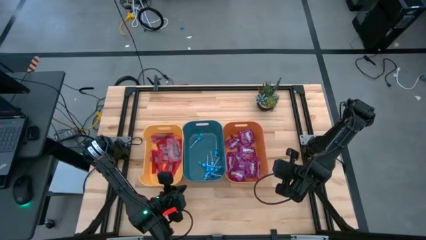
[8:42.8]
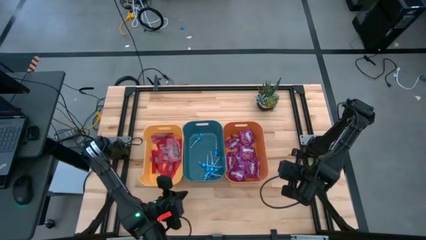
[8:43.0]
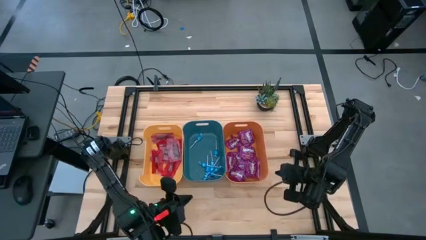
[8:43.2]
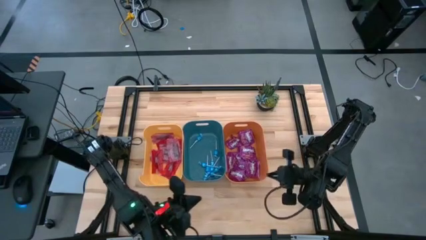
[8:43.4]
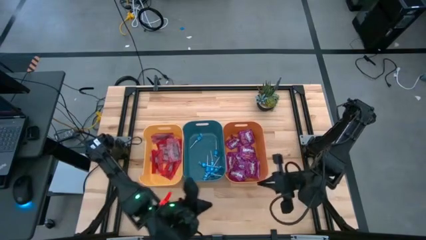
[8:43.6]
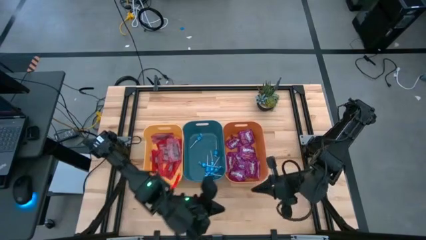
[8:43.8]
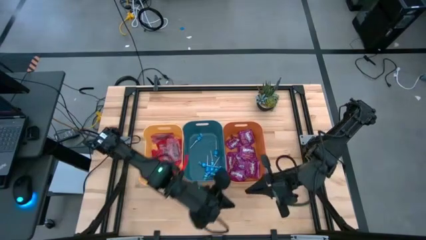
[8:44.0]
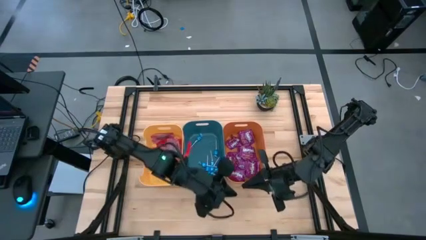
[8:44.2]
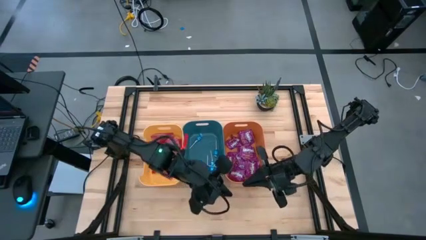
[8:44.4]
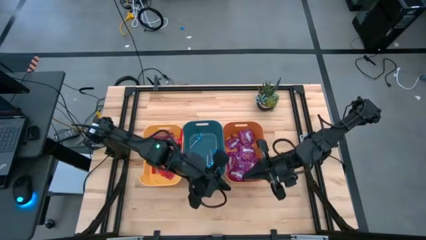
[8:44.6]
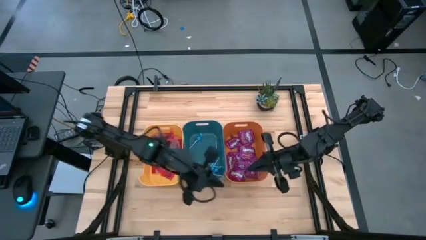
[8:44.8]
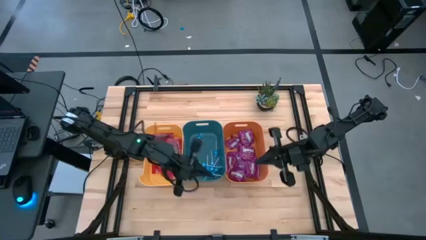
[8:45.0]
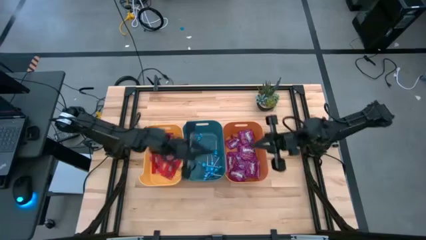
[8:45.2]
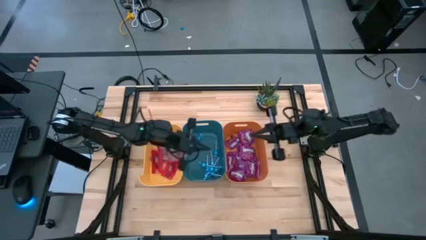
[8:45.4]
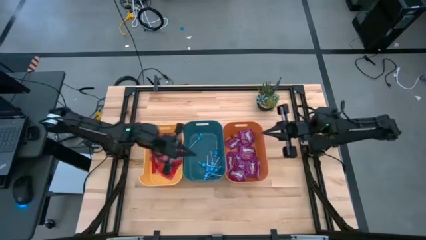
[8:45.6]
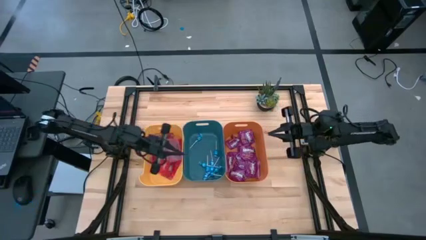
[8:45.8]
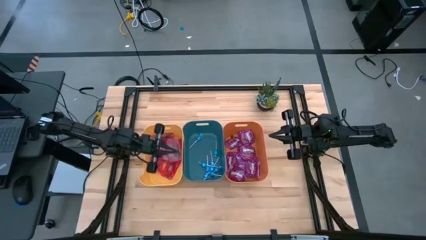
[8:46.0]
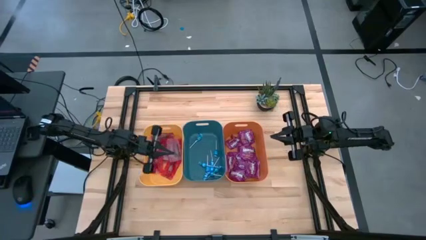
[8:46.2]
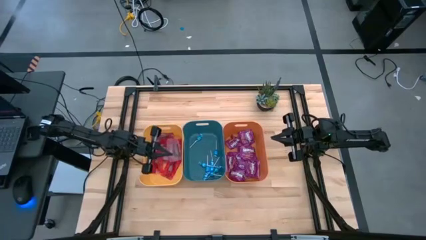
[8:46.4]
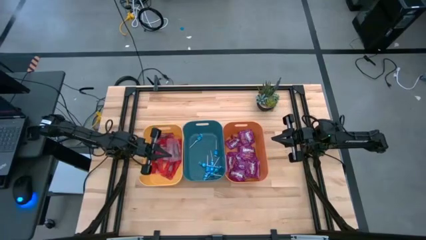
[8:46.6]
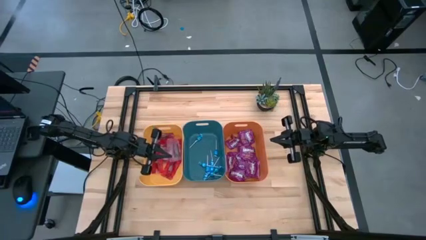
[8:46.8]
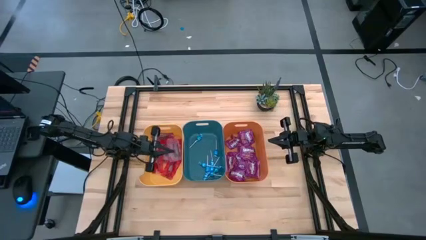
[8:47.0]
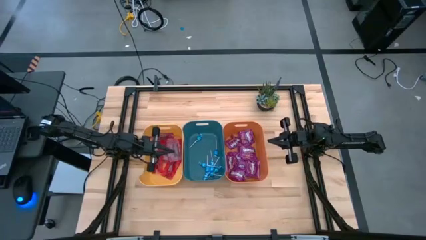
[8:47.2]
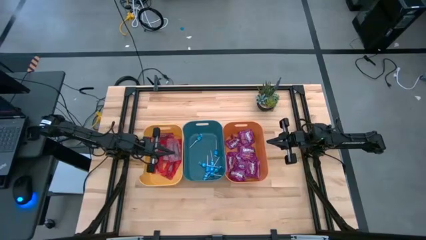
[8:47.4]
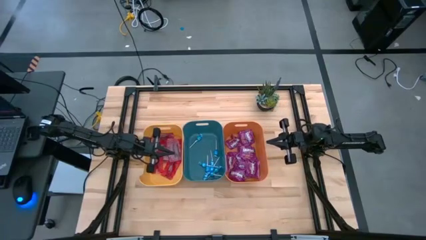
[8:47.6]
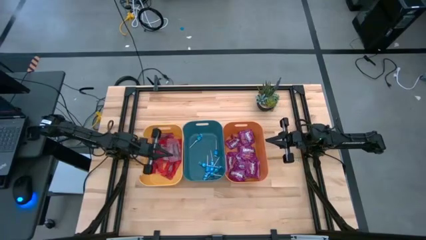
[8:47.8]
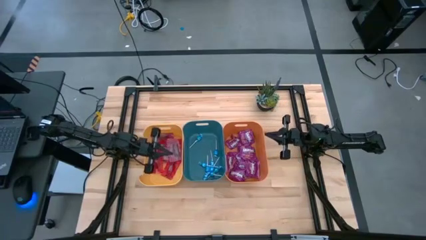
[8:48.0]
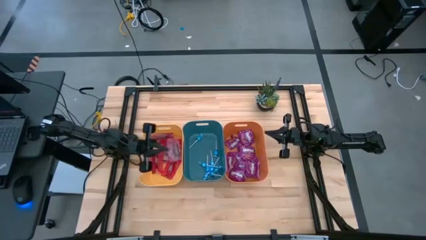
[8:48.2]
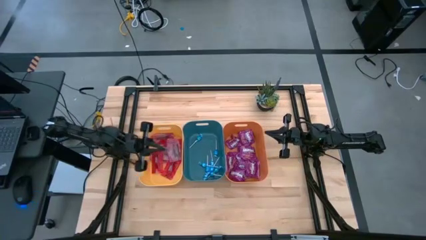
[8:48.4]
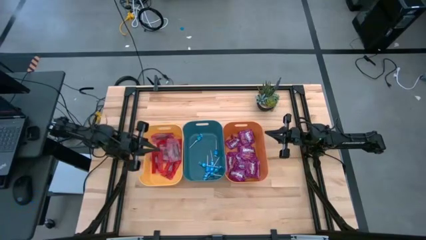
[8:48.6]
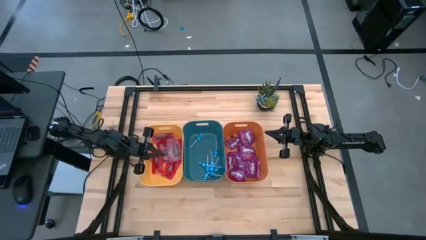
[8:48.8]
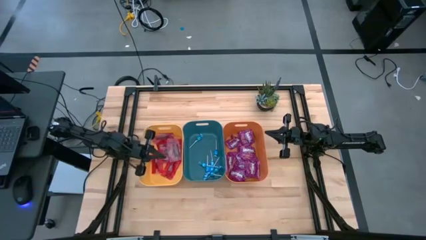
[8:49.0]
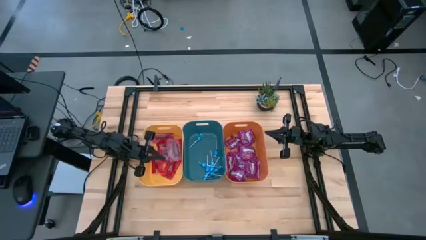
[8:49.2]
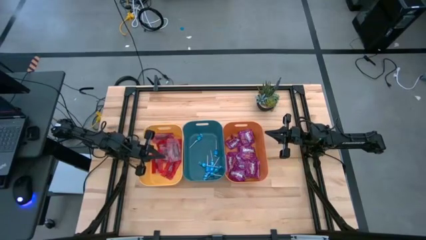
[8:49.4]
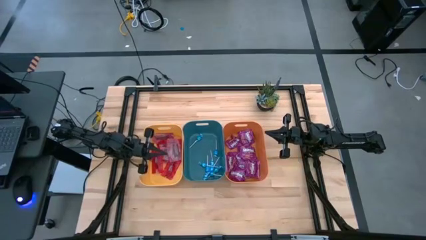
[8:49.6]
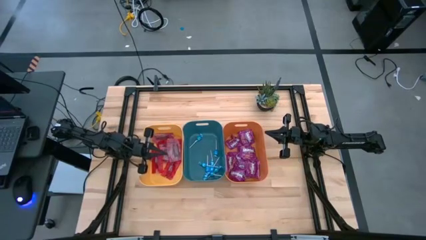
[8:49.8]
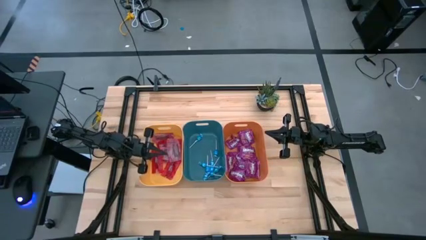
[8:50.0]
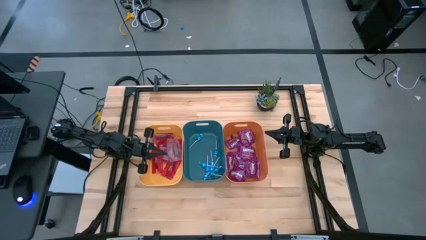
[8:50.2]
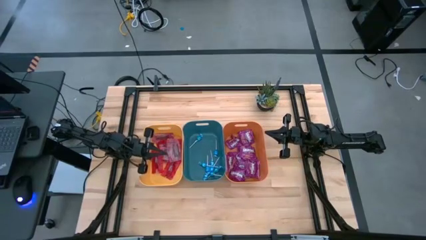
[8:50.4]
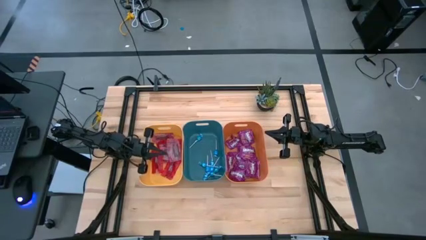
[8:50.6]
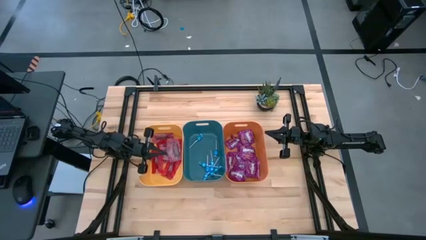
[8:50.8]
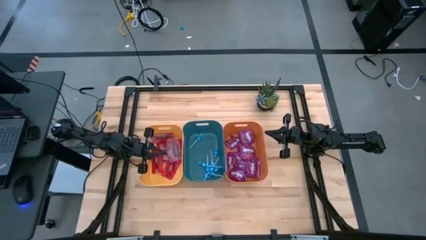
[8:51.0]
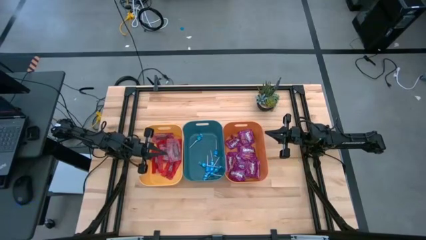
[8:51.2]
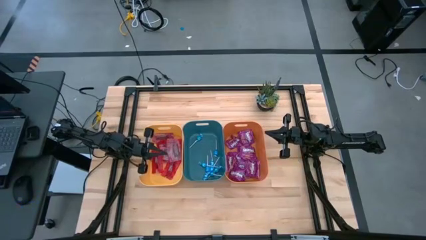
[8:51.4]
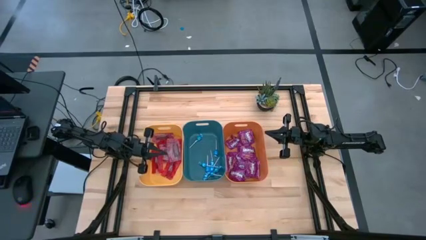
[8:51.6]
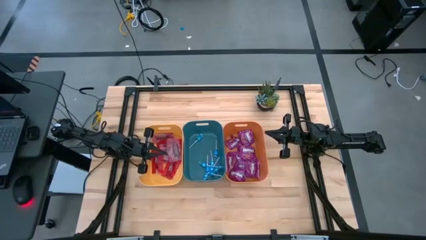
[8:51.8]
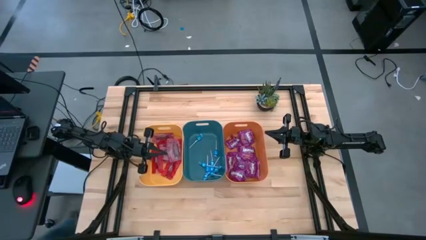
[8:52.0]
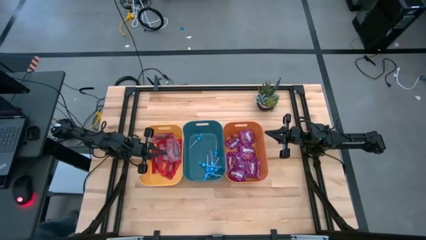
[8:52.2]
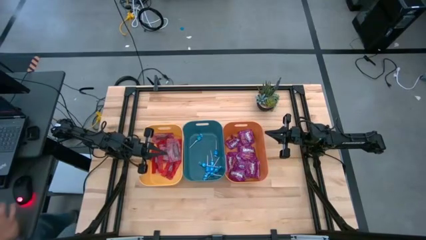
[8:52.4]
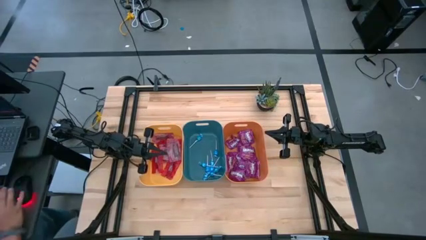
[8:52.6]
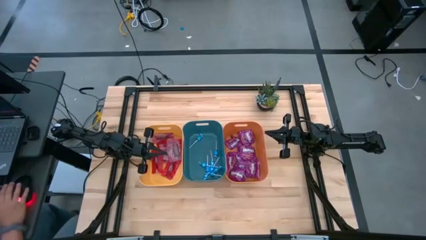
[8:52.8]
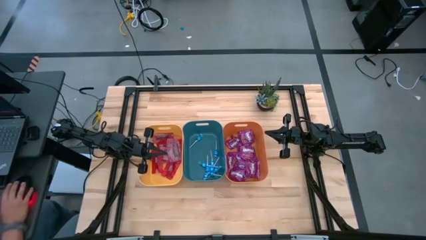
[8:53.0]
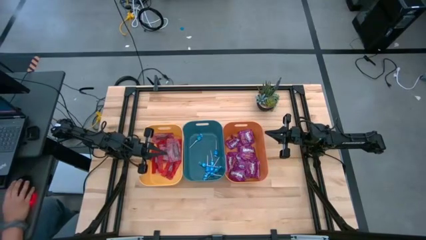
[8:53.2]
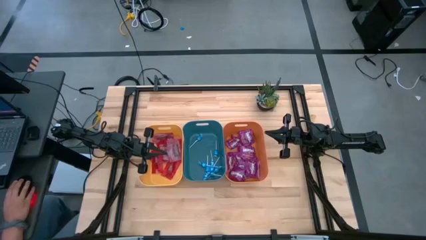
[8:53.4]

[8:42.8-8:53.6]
Task: Sort candy
Return to Home Position

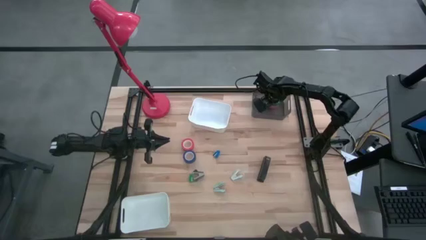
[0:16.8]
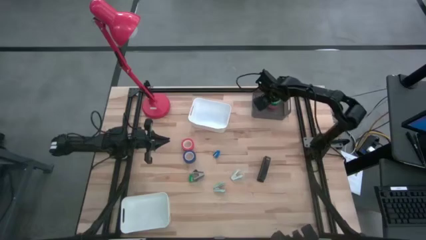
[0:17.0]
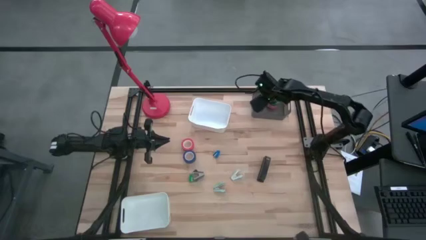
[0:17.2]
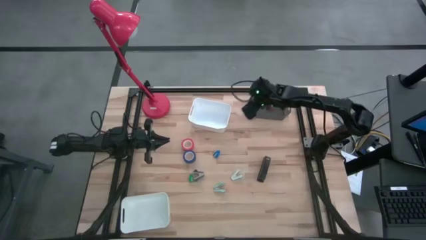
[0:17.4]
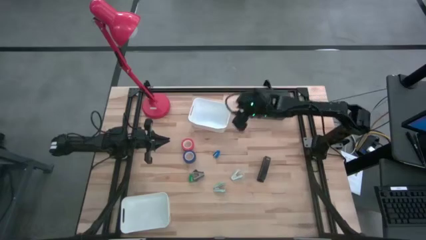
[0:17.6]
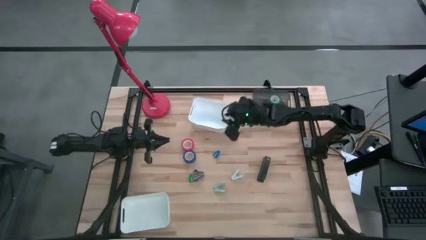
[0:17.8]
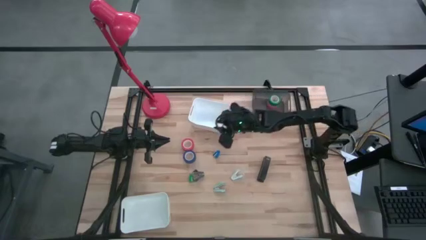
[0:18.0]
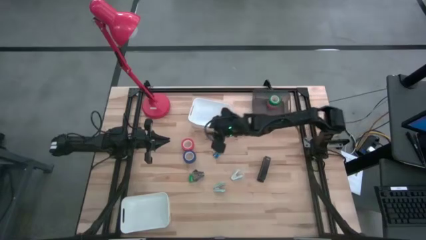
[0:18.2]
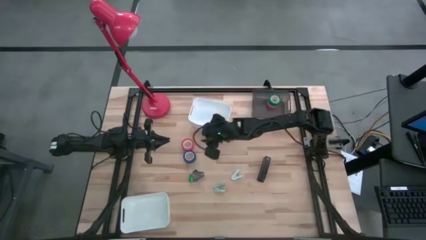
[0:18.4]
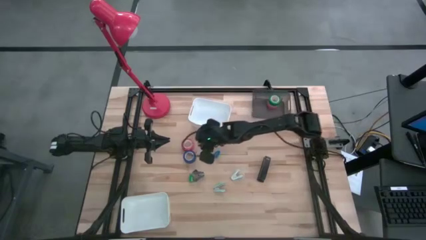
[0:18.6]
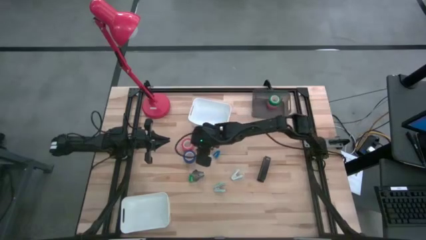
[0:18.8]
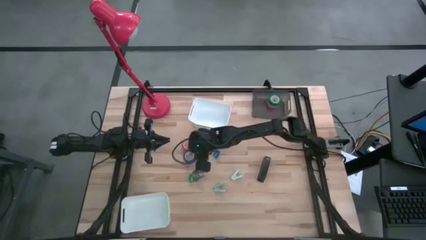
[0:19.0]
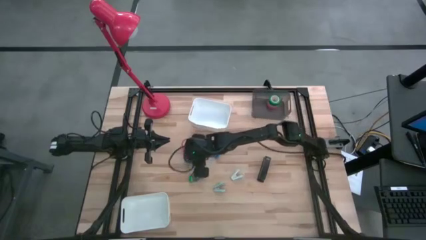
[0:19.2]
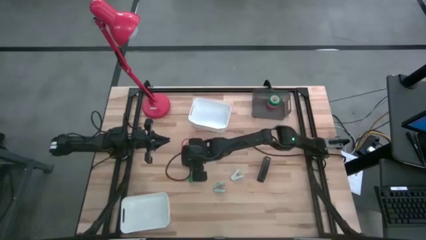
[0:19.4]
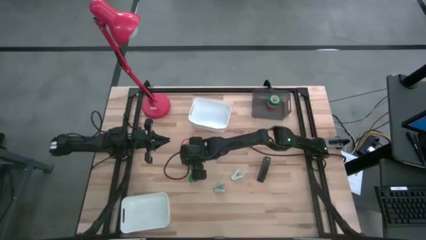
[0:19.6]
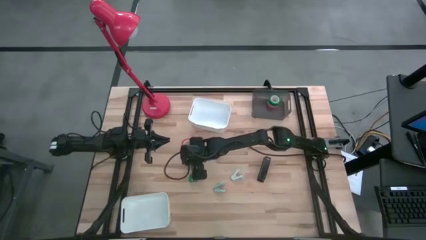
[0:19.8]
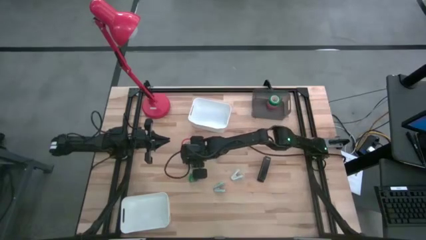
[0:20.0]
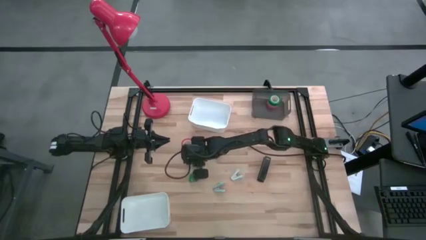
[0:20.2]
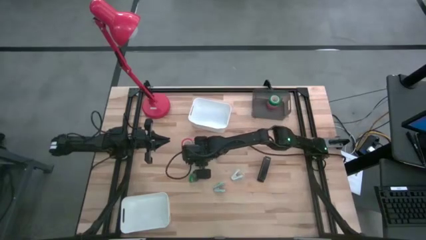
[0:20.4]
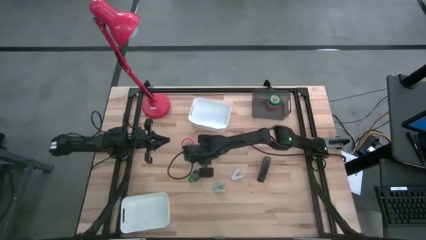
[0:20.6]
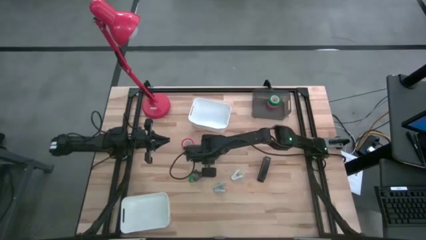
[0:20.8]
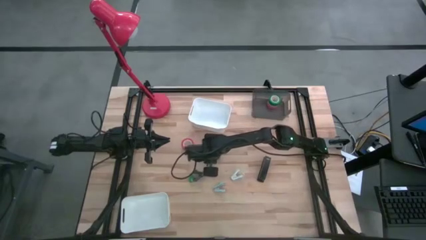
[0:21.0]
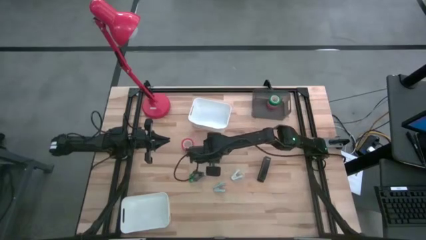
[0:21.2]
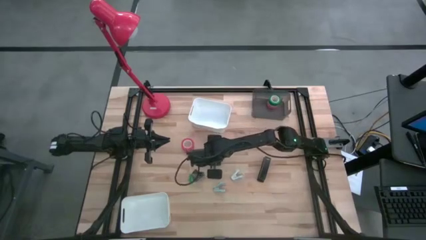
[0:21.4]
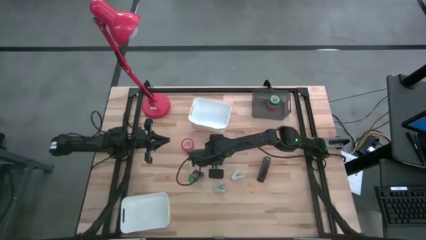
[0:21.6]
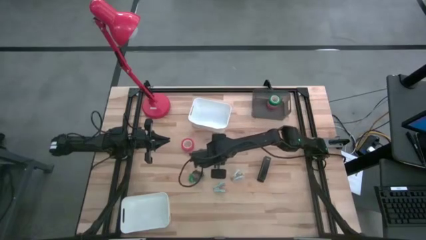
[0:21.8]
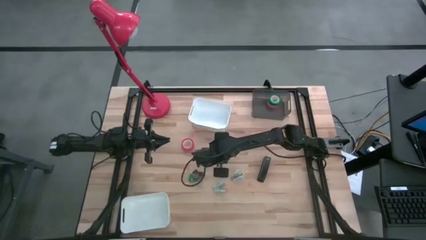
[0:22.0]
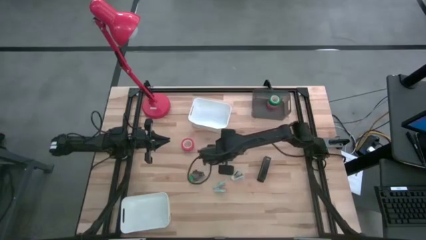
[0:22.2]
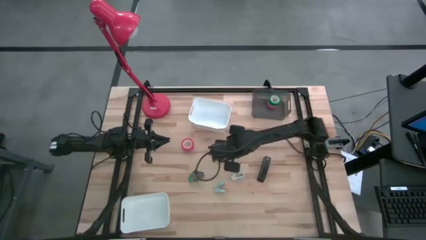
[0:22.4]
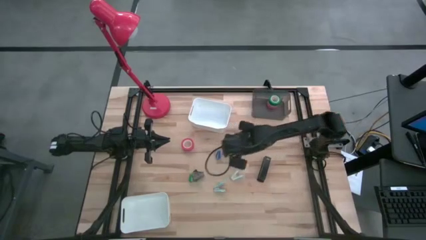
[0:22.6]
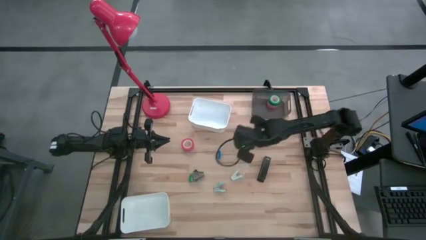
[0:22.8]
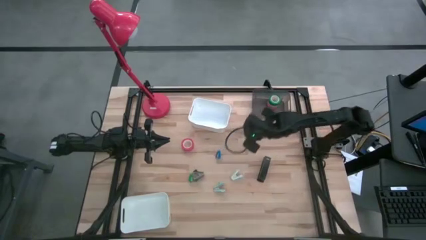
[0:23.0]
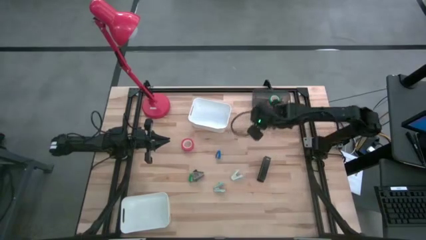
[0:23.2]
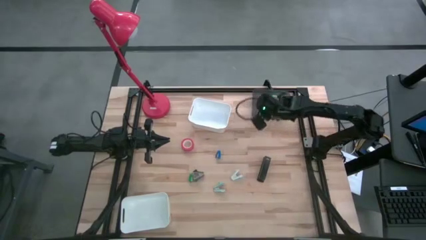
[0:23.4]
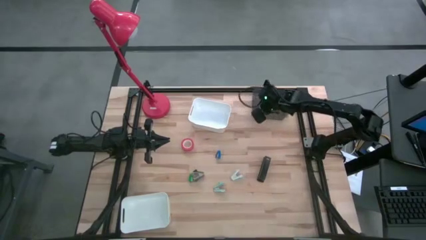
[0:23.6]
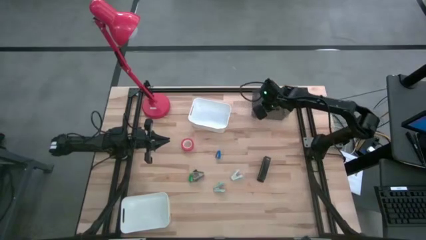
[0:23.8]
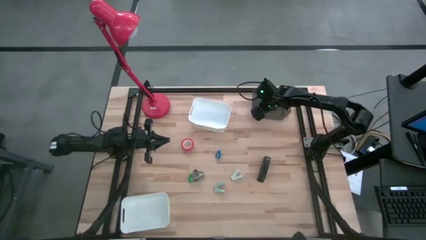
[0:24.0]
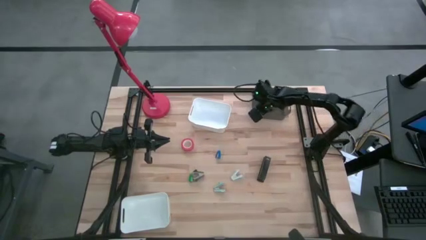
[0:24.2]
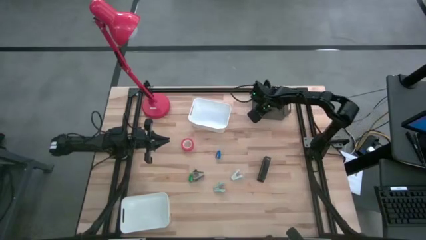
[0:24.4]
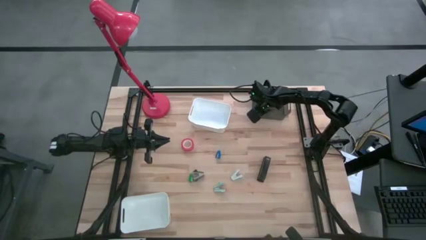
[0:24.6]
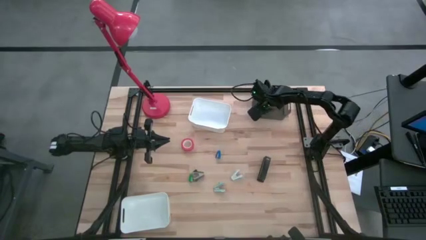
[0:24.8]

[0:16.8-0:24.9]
Task: Pick and place Stapler, Stapler remover, tape
Put the blue tape into the gray bin
